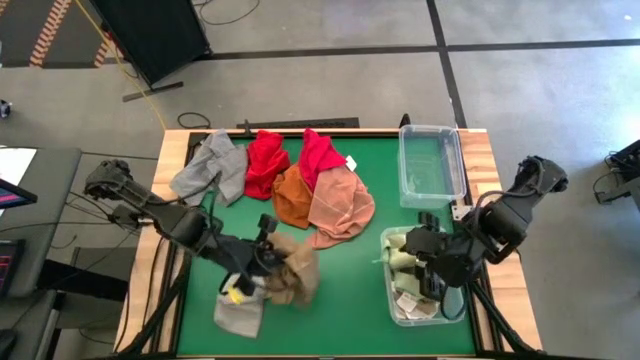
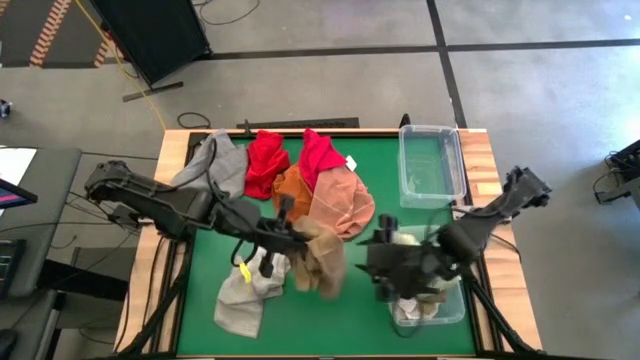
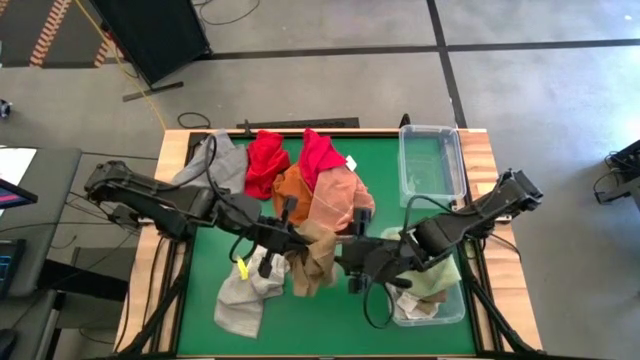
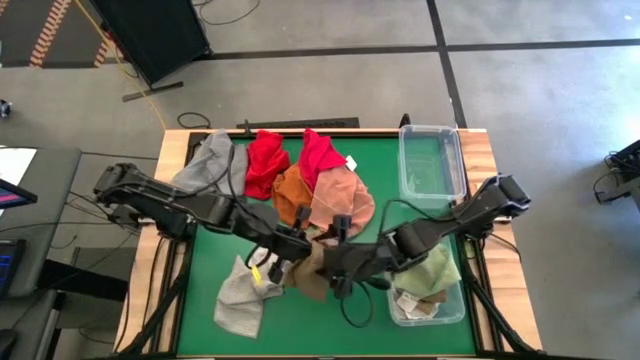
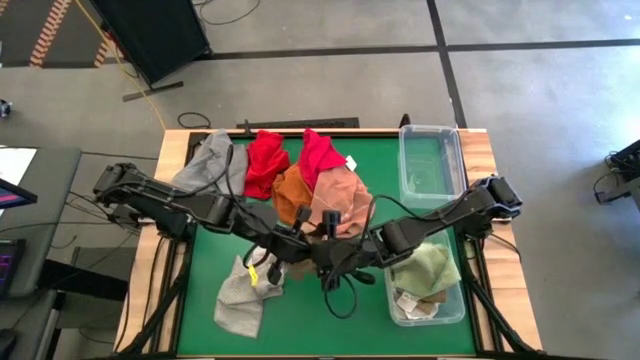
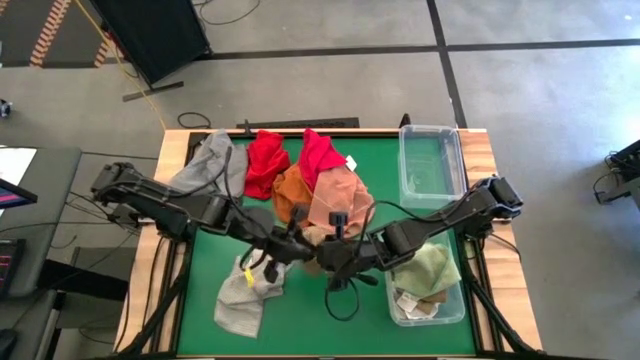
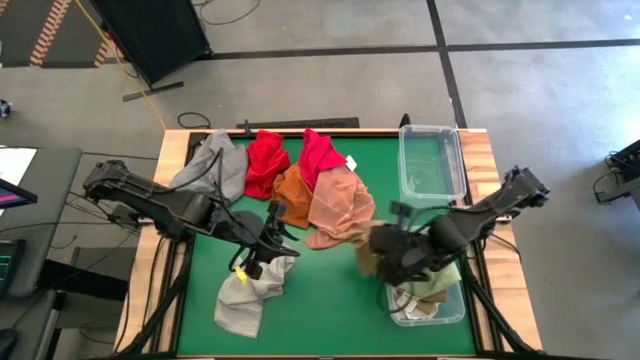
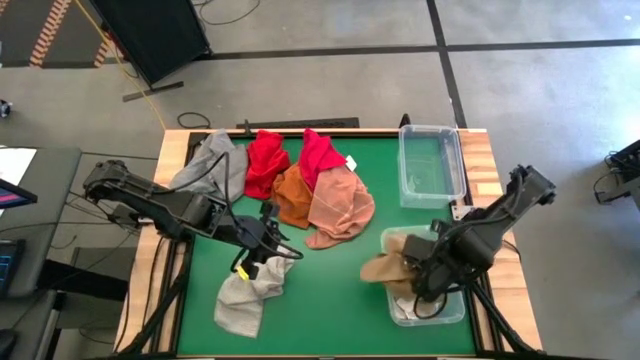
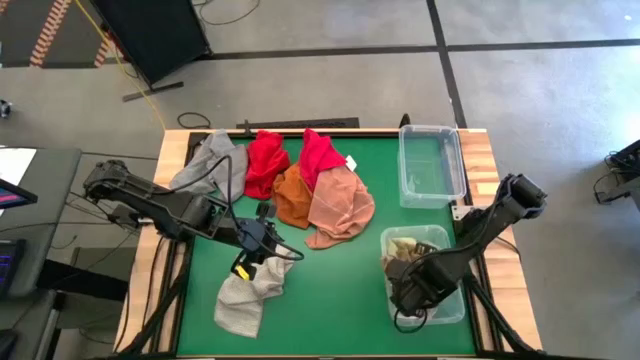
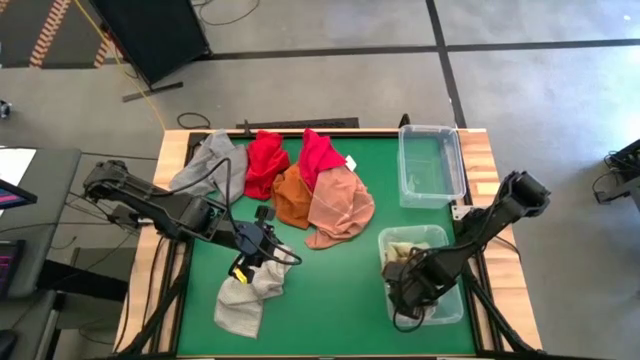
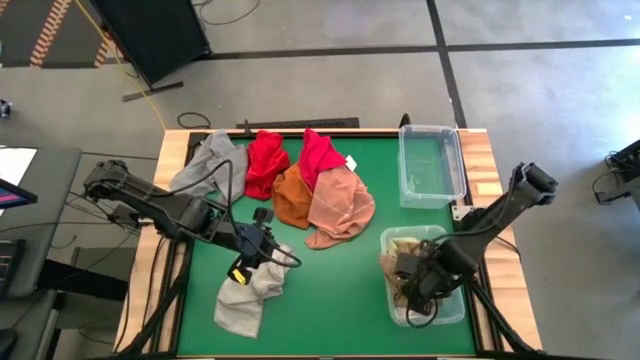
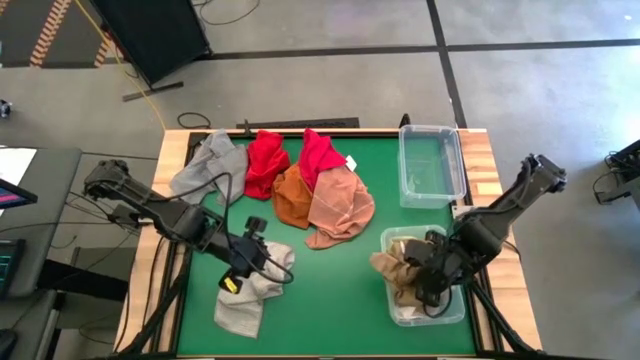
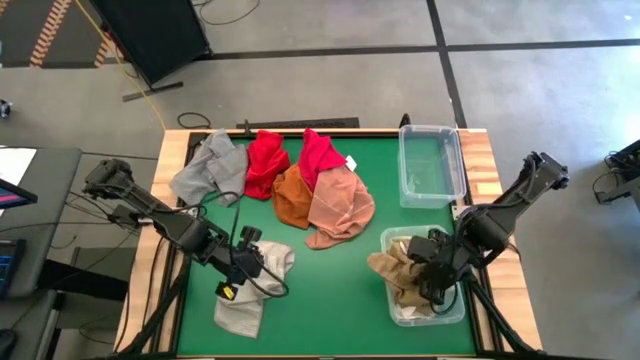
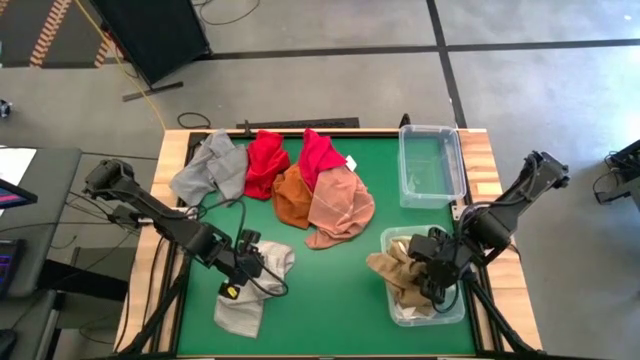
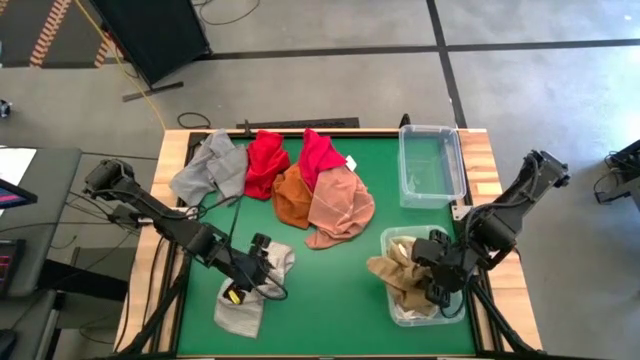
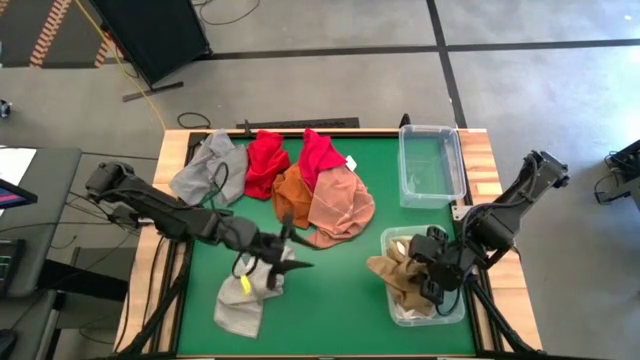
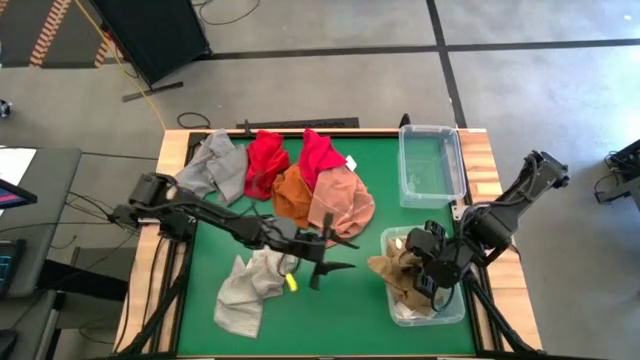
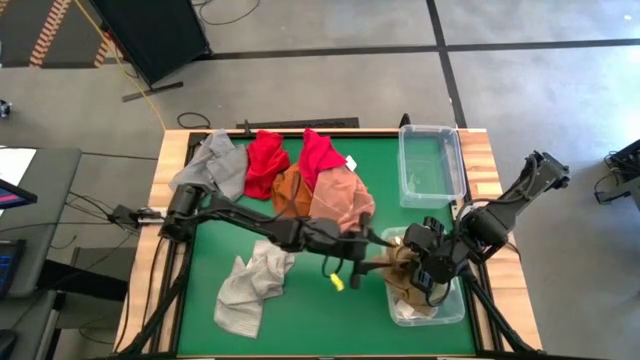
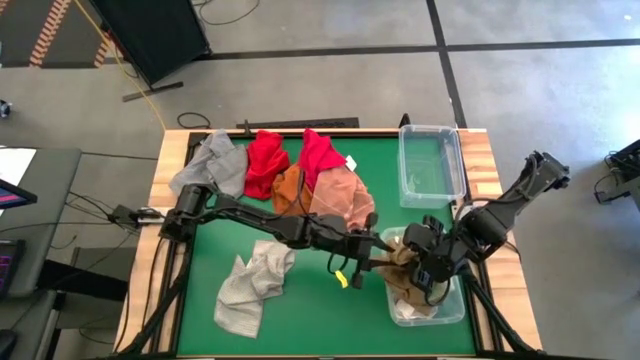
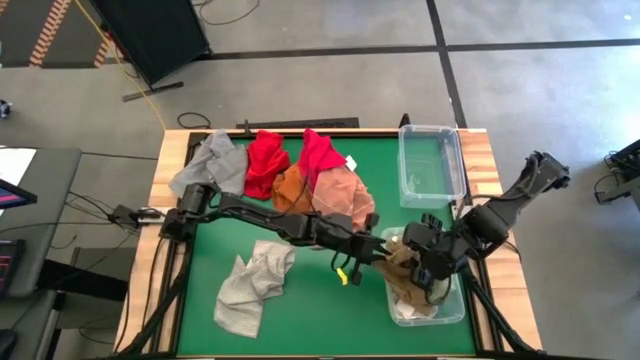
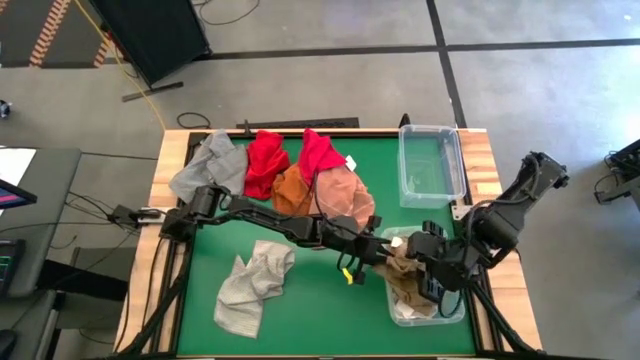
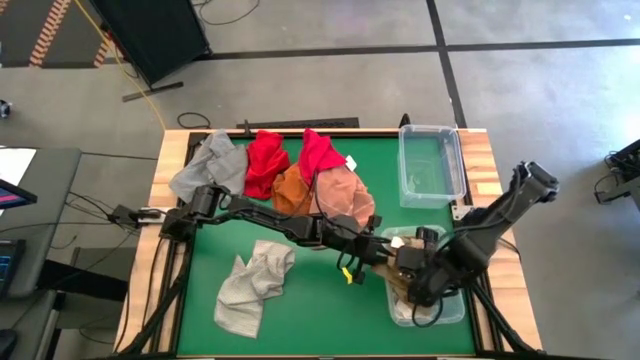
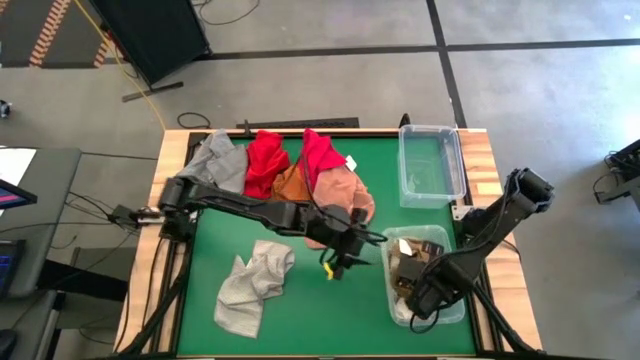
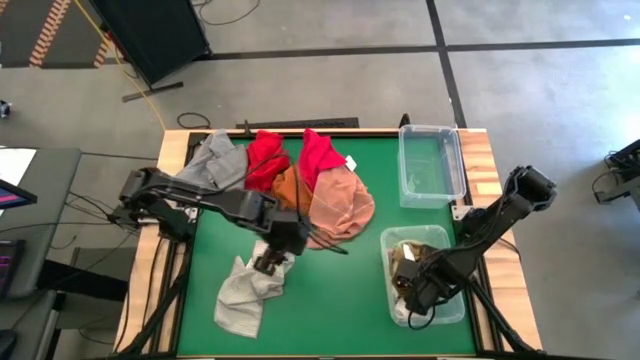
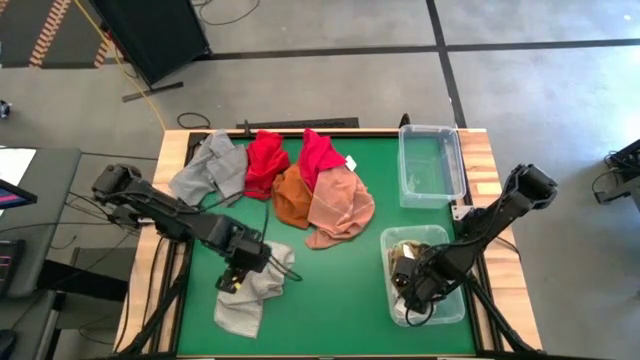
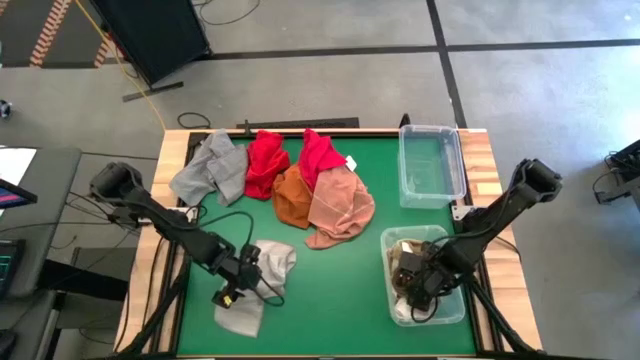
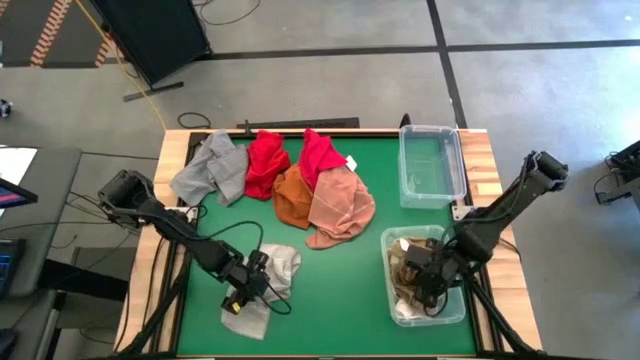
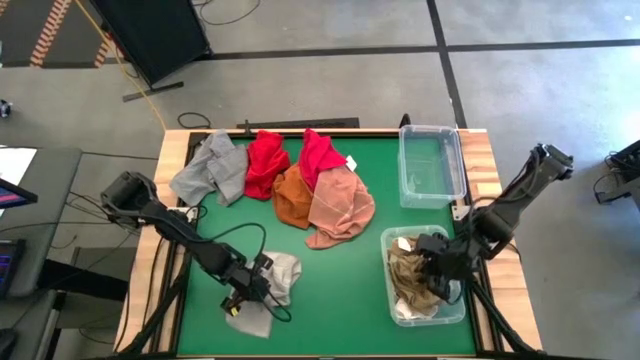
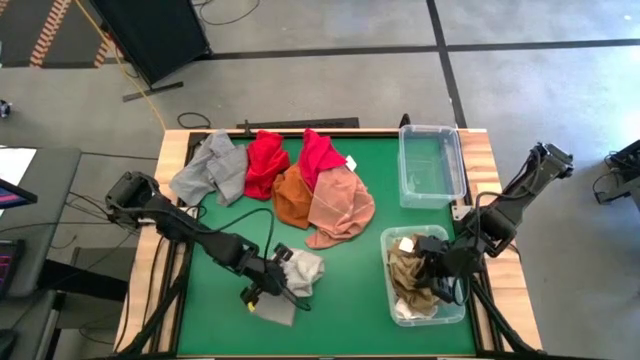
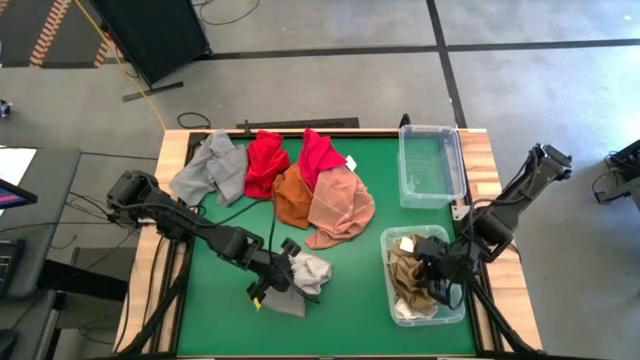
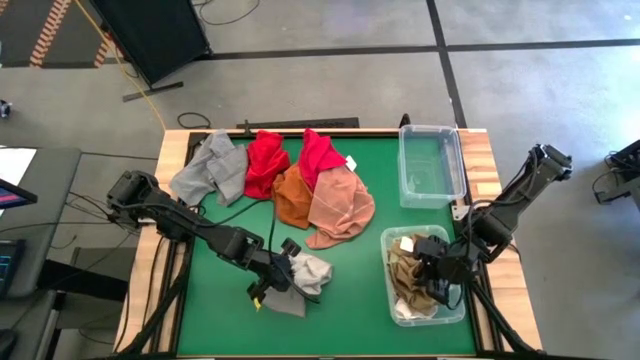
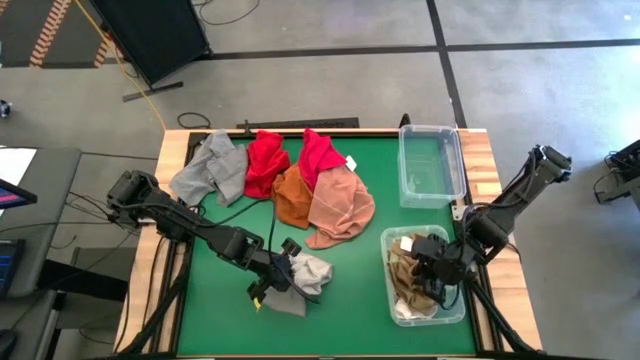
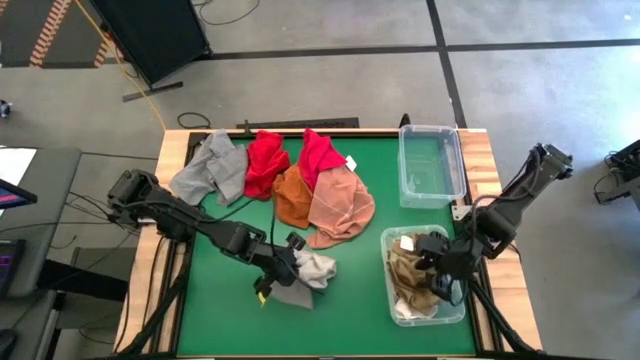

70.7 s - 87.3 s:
Task: Sort towels by color in basket
Put the brown towel into the bottom transparent bin

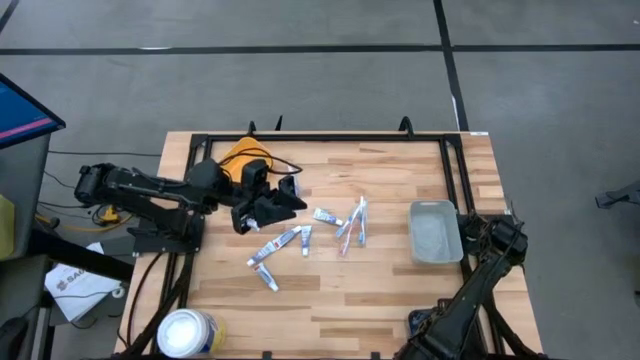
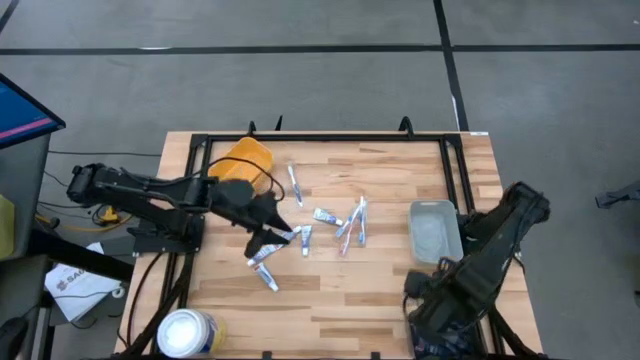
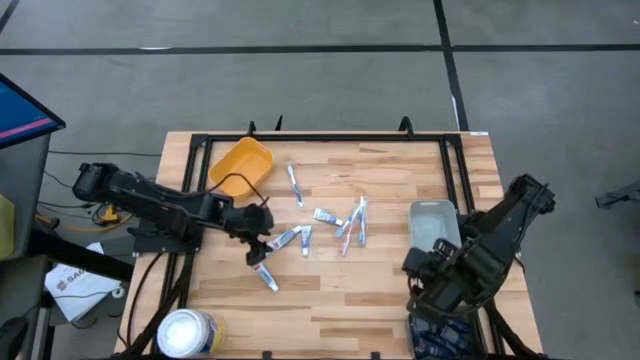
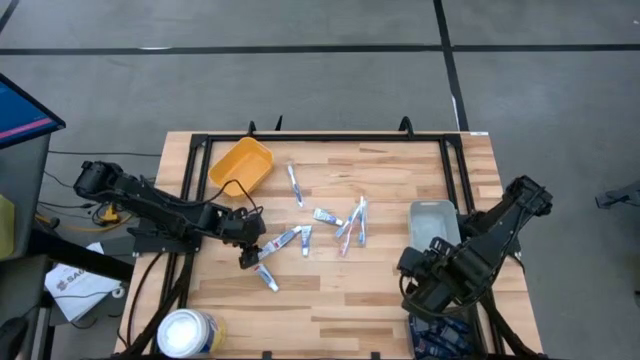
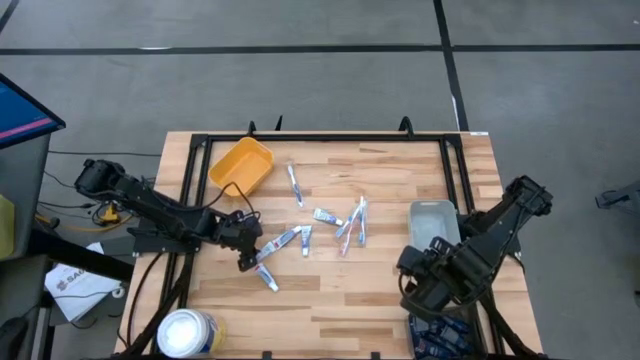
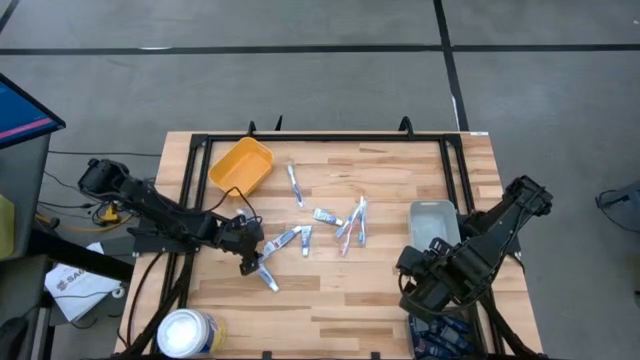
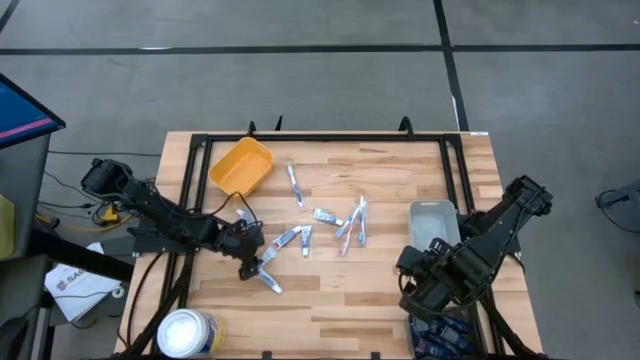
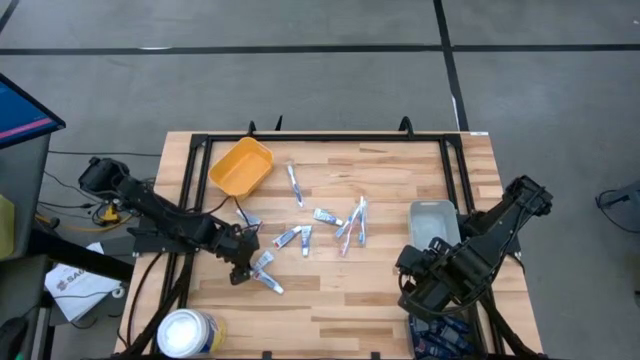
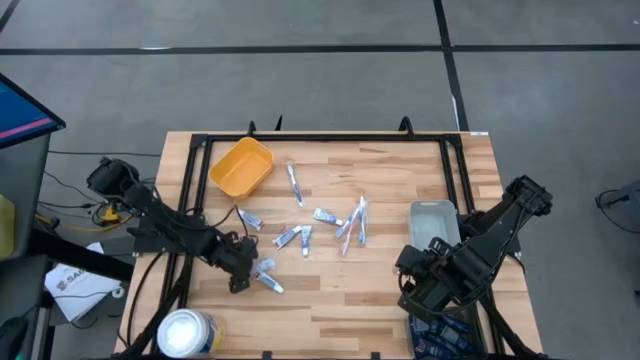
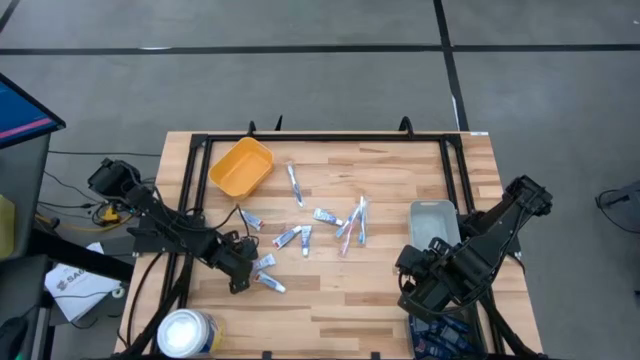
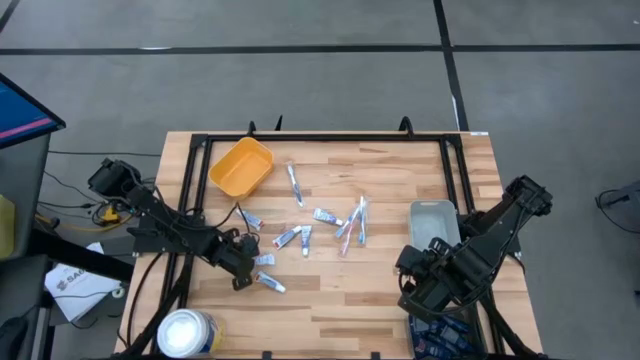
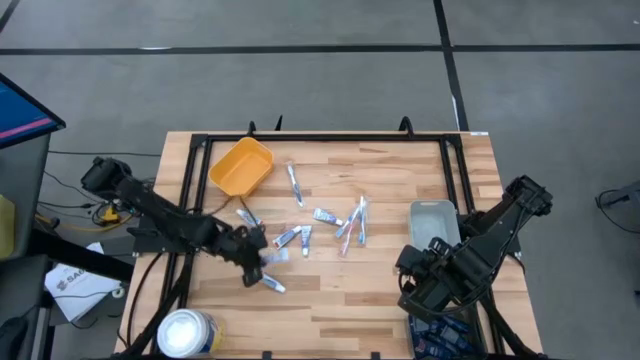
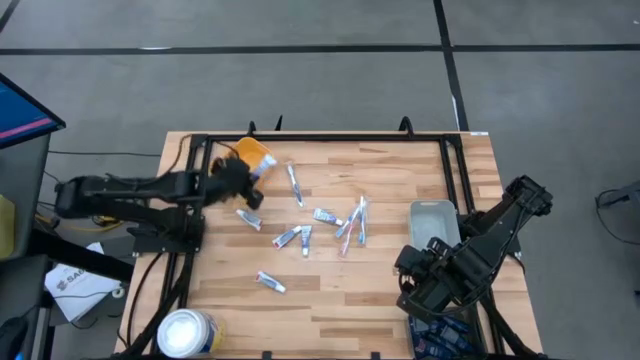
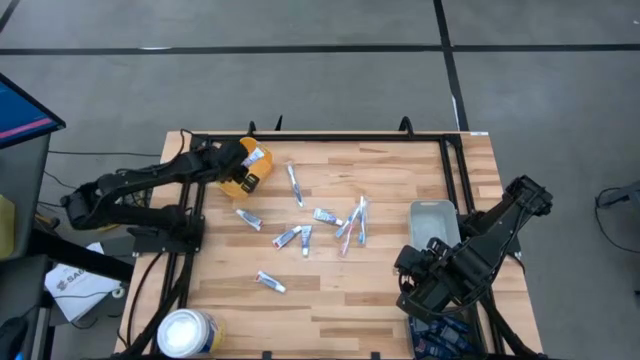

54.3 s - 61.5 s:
Task: Pick & Place Travel size toiletries
Put the white toothpaste into the yellow bin
